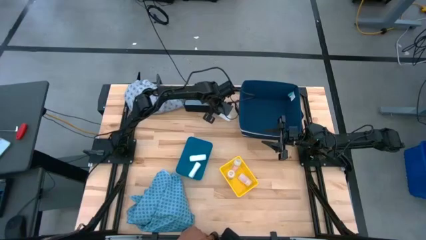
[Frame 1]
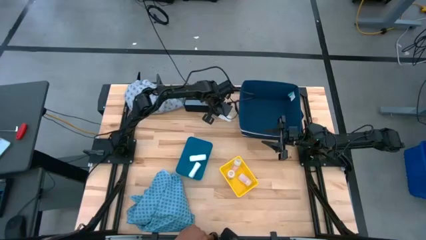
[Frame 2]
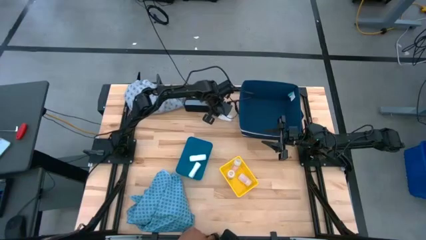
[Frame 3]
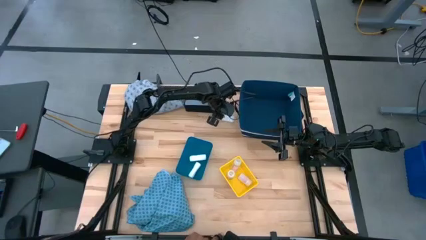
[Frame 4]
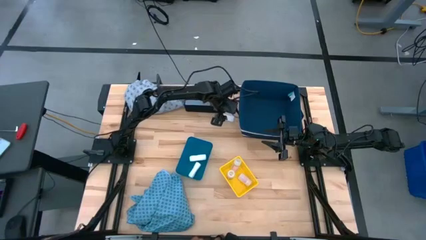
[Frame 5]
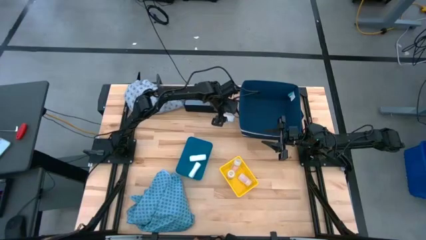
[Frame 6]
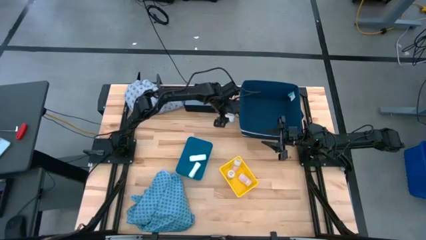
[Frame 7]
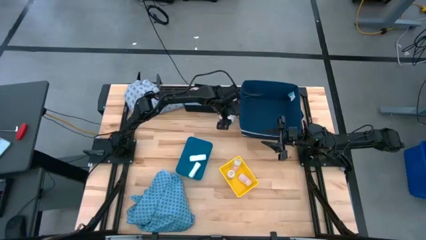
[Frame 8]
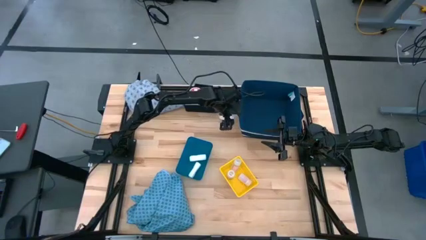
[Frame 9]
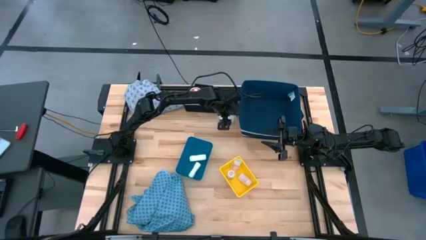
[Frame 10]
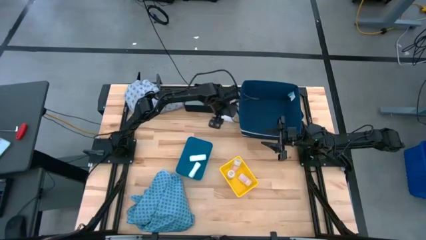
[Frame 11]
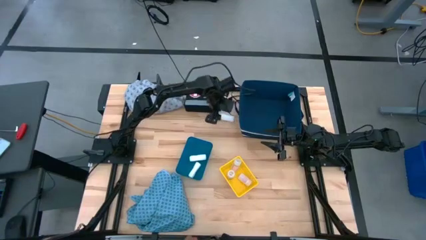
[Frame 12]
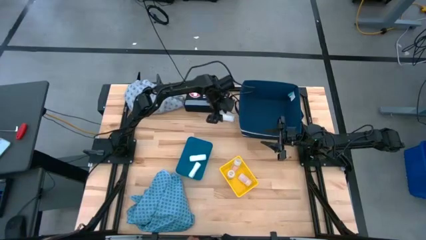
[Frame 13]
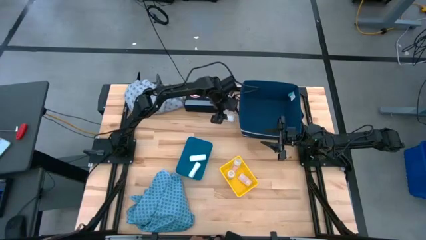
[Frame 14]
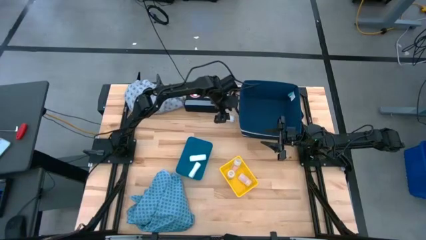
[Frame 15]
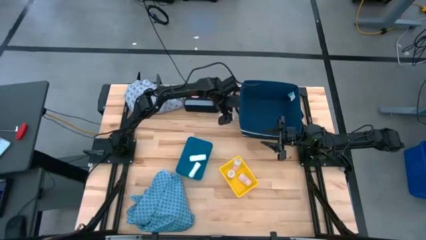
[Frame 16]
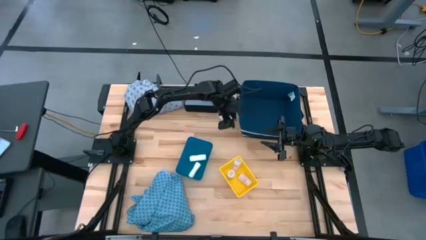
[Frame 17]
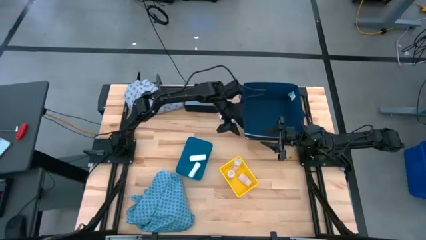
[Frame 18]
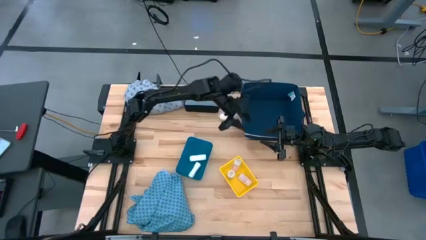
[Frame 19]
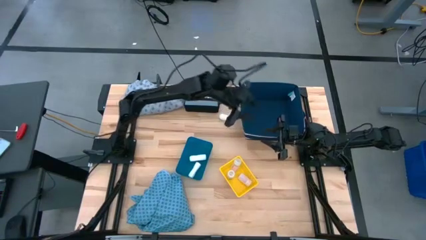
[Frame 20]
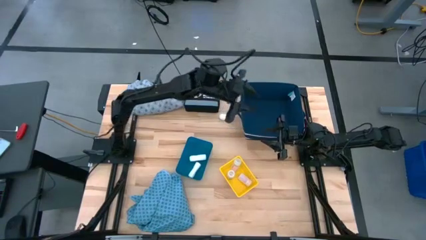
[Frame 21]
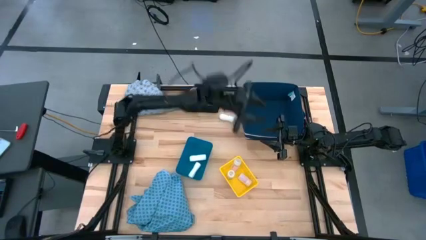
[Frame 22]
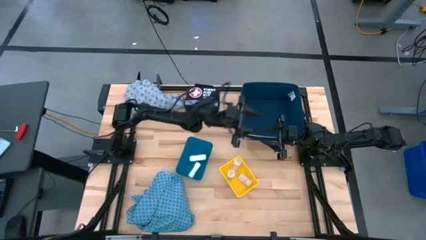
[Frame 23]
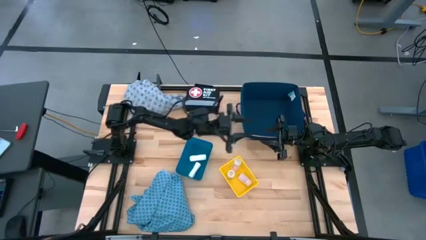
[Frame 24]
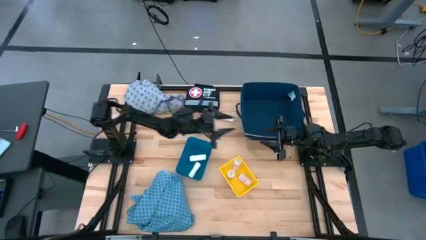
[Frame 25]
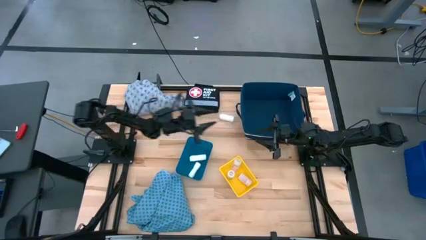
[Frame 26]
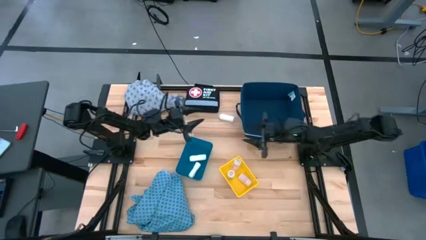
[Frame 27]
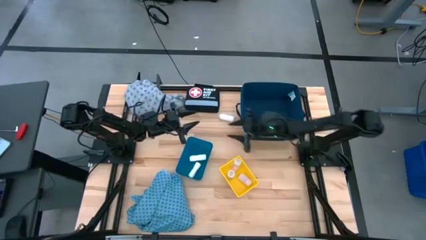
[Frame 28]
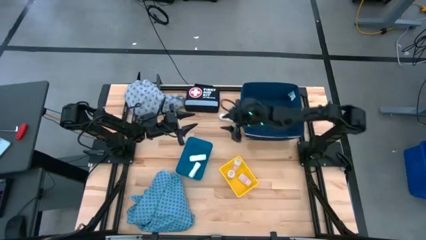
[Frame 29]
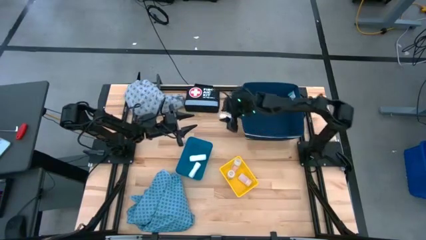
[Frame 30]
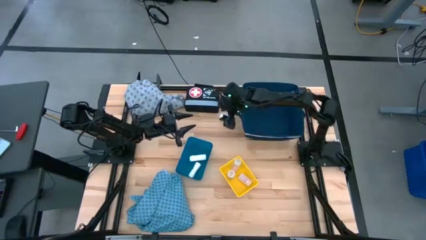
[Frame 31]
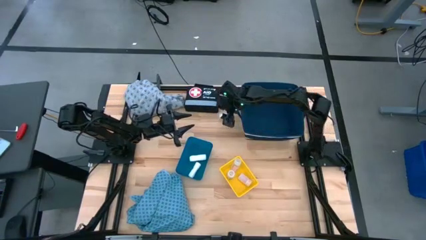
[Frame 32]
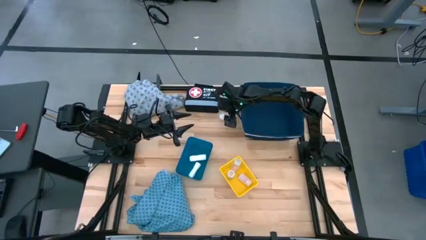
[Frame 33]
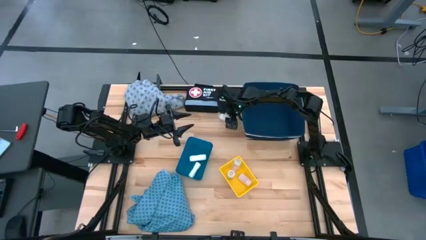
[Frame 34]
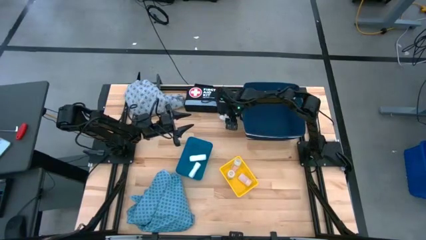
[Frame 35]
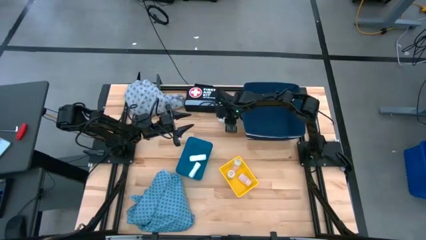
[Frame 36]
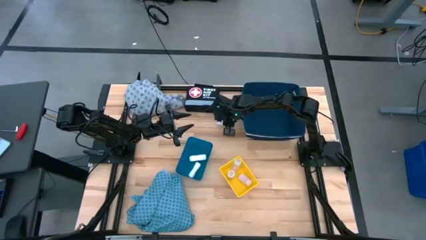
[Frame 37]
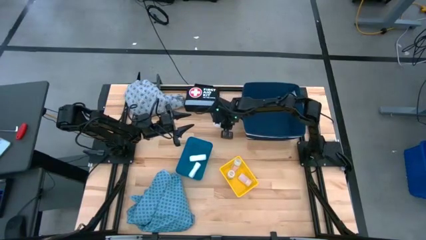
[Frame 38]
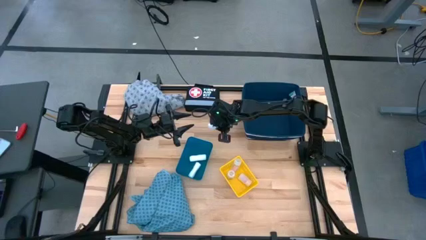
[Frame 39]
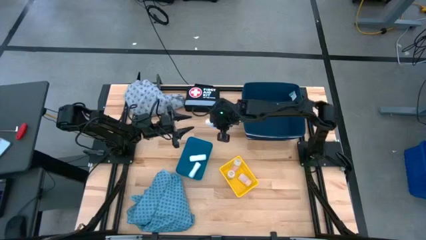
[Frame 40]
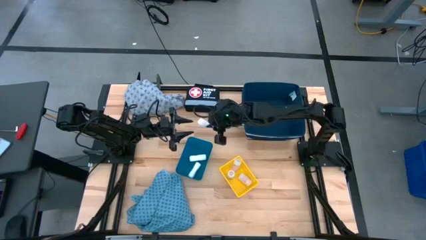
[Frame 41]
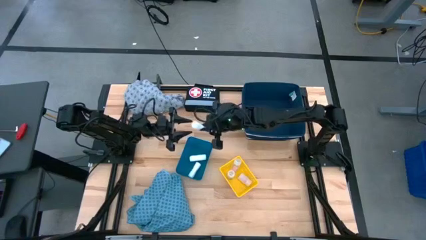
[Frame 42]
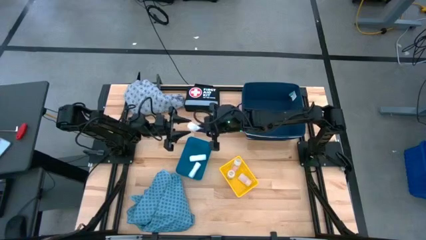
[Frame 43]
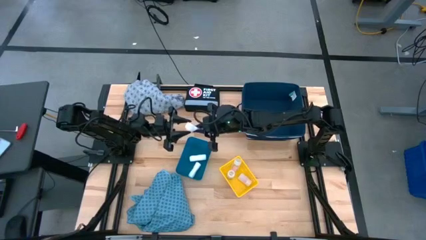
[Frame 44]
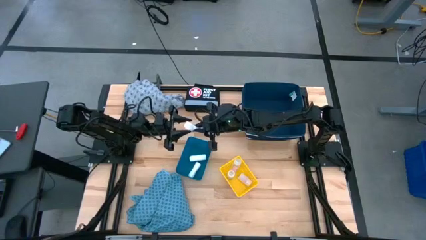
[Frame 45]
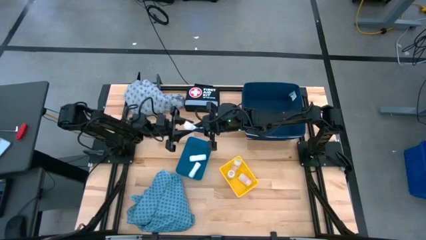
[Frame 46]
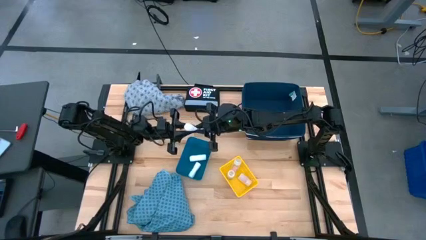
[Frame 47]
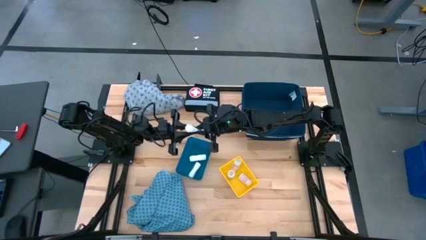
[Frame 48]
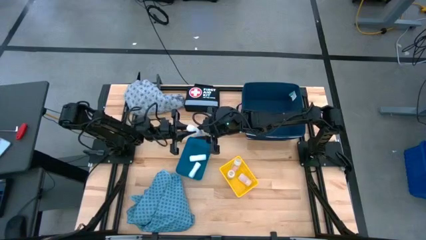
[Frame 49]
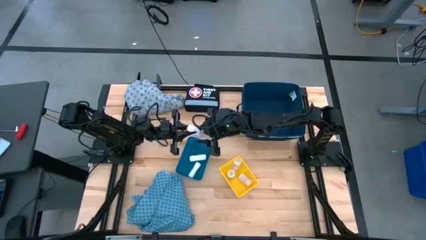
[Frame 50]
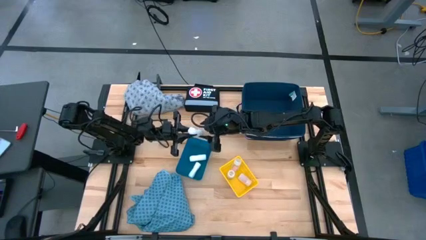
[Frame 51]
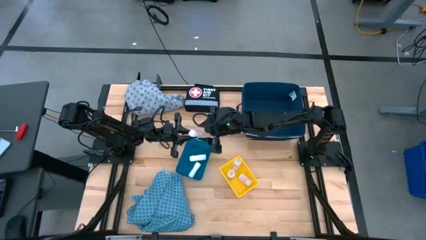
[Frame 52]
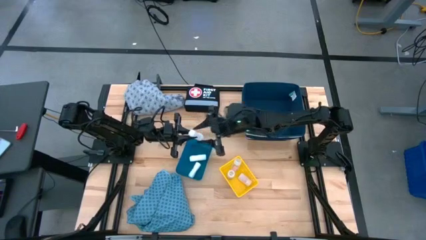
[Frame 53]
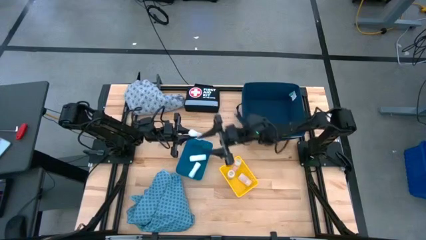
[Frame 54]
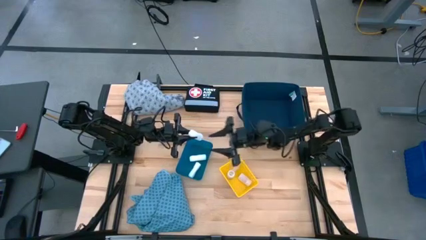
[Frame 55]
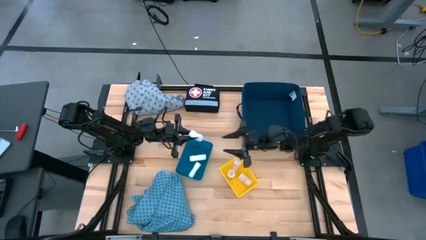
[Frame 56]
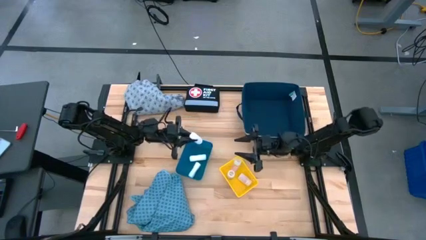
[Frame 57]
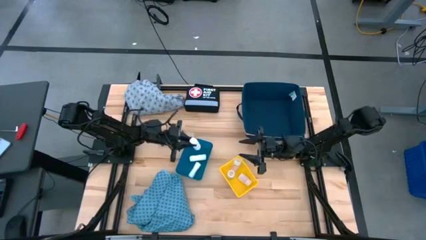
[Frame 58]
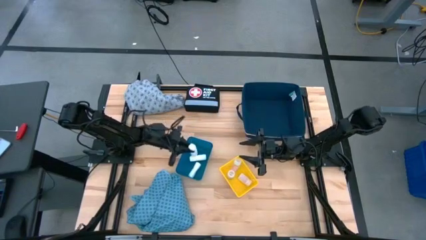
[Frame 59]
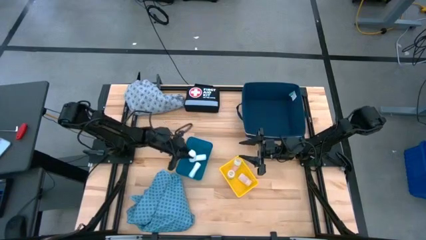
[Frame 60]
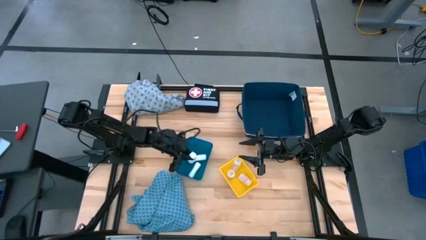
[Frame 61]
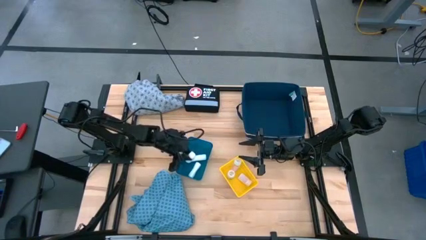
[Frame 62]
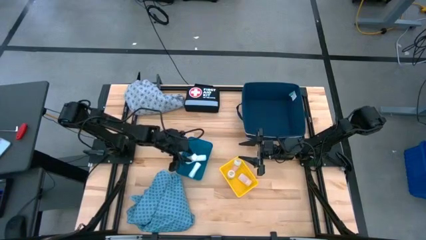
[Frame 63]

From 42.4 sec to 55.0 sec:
Task: Pick & place medical supplies in basket/bin
Put the rolled gauze into the blue bin

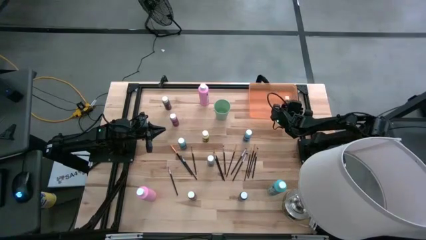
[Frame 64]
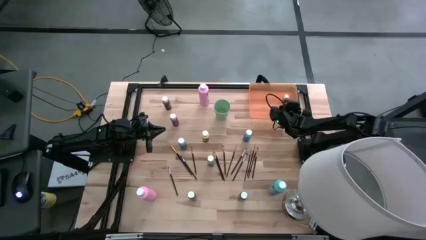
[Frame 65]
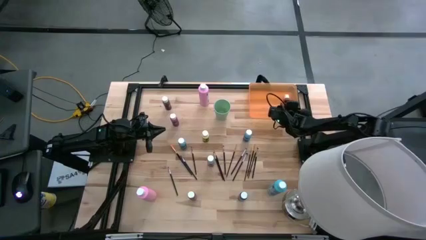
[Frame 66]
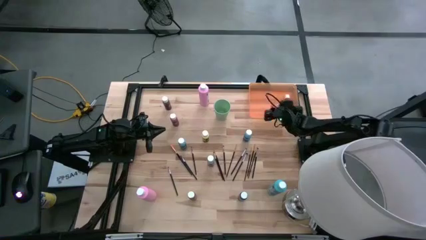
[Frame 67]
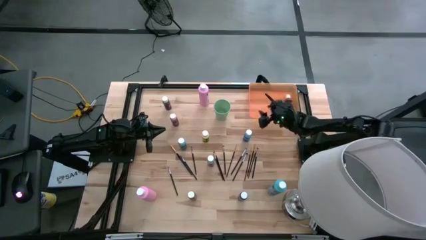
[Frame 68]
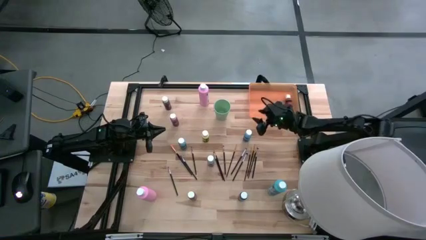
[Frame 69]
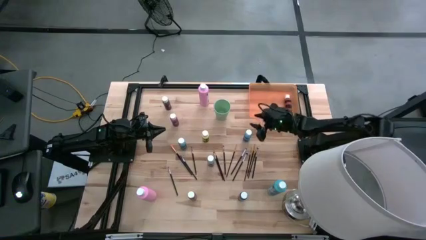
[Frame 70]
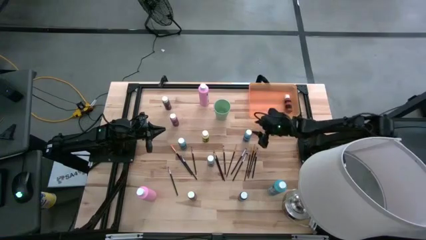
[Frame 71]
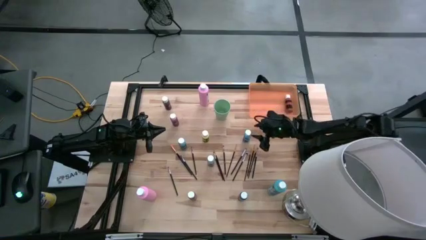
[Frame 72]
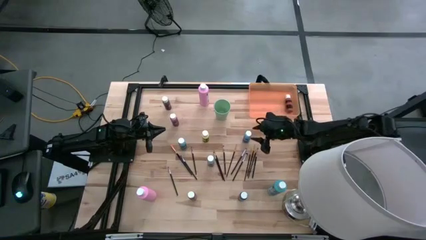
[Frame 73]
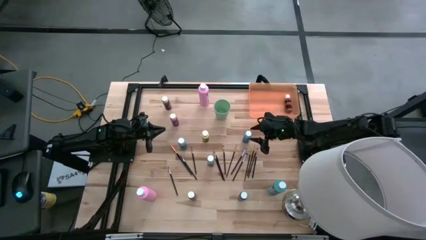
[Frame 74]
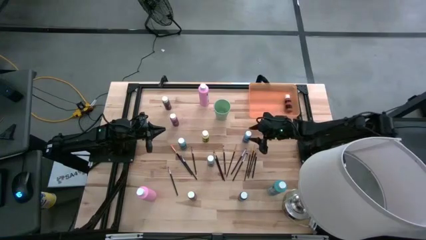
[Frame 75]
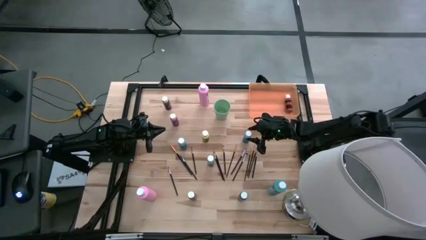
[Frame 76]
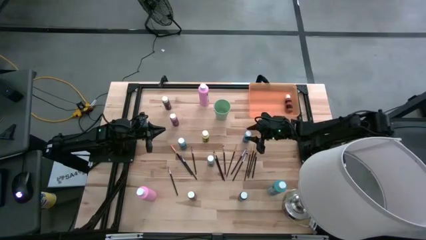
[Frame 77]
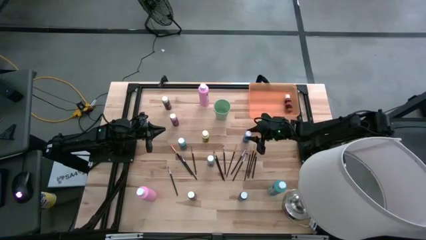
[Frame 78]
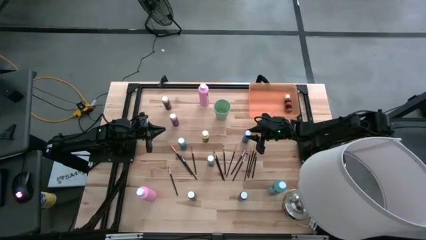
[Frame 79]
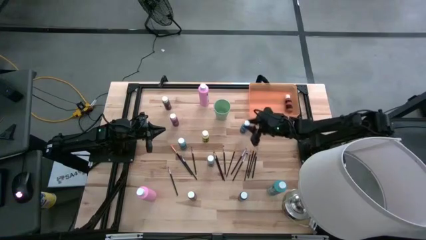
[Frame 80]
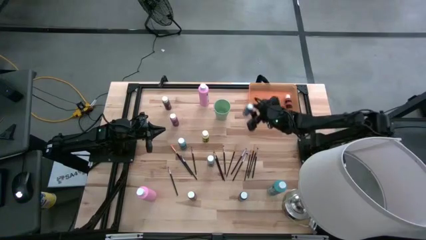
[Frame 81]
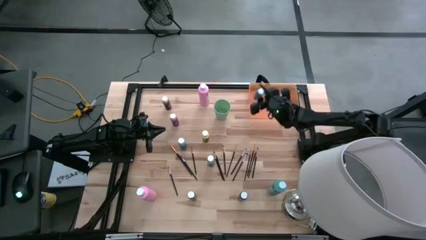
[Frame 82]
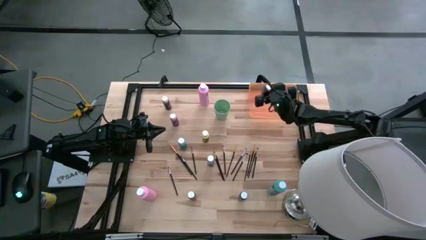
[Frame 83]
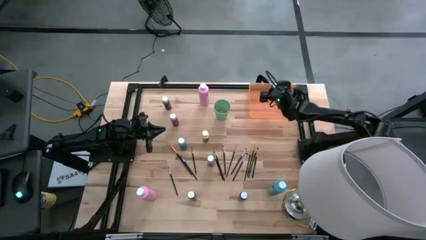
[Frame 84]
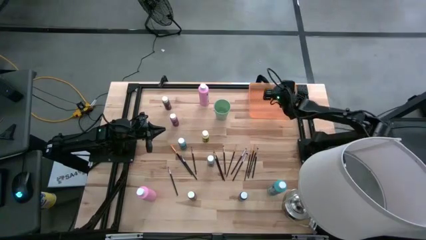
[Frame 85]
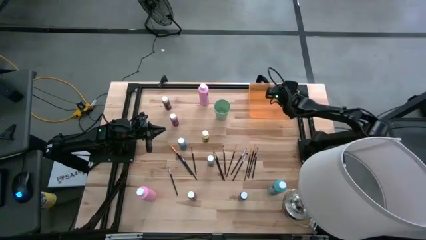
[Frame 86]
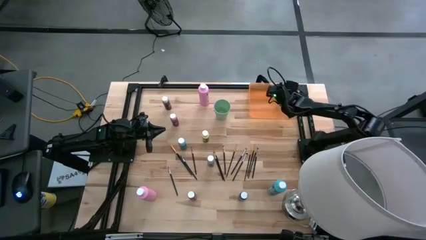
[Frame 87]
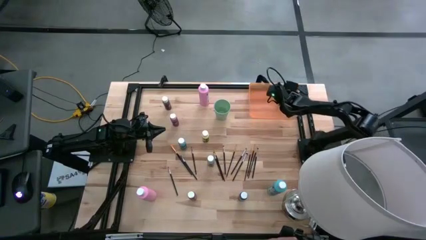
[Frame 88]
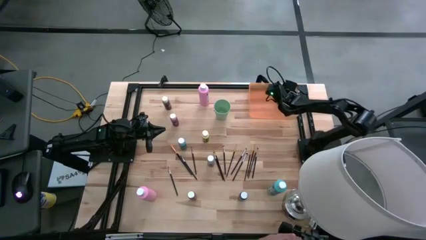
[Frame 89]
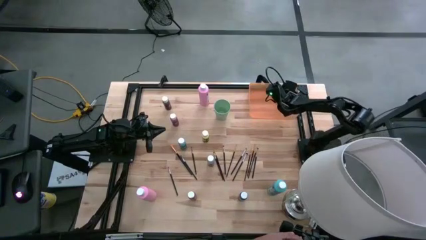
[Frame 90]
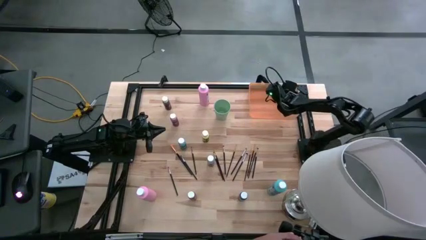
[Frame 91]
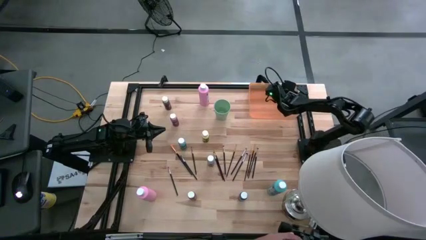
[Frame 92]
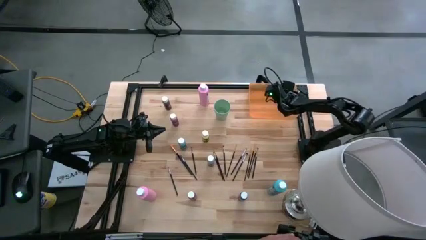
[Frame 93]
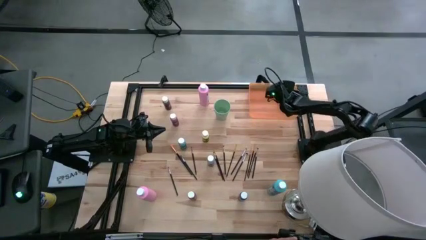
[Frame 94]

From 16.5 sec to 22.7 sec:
Task: Pick & Place Paint Supplies
Put the right small blue paint bottle into the orange bin
